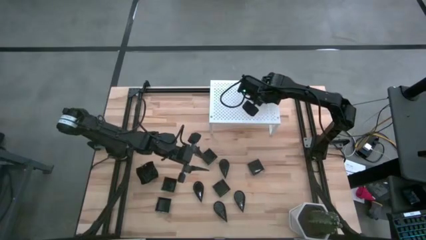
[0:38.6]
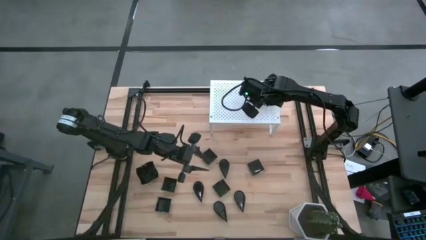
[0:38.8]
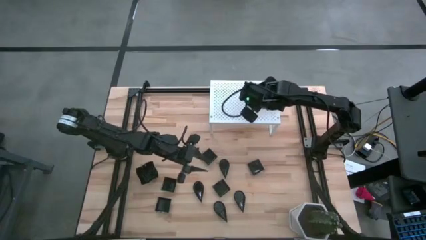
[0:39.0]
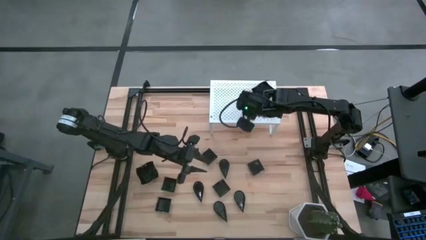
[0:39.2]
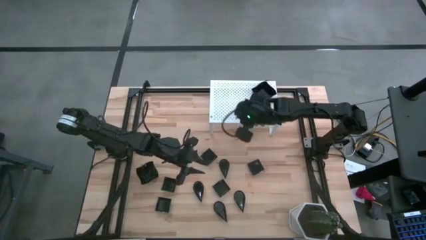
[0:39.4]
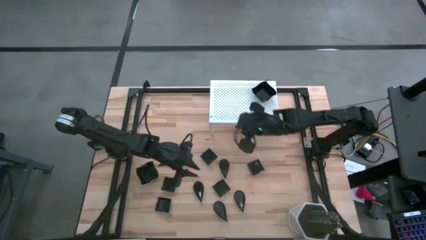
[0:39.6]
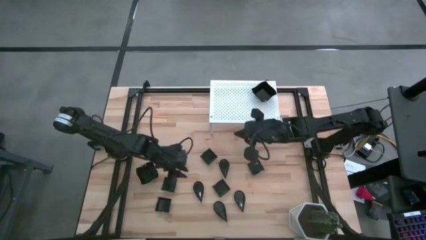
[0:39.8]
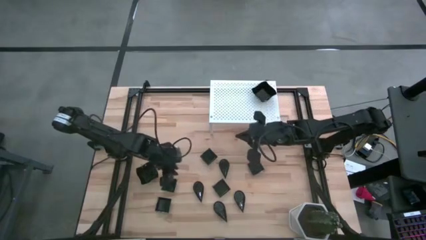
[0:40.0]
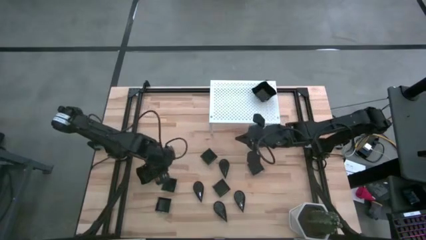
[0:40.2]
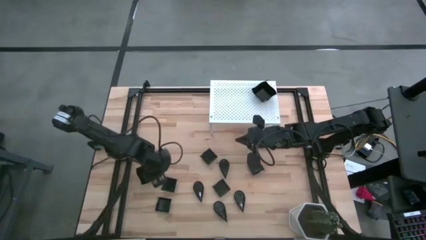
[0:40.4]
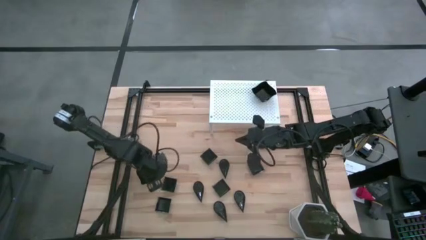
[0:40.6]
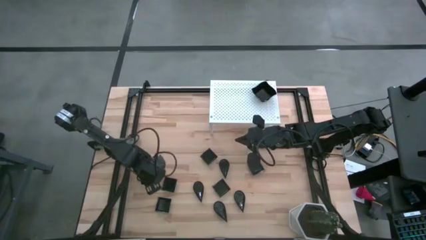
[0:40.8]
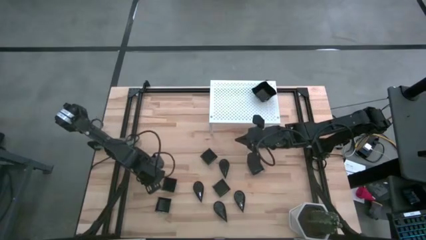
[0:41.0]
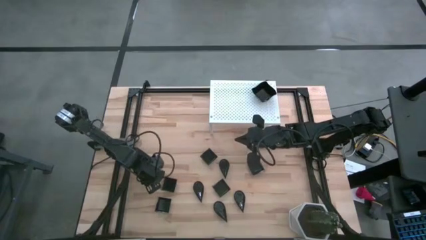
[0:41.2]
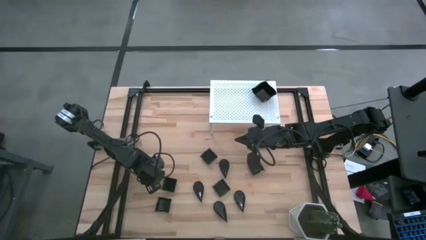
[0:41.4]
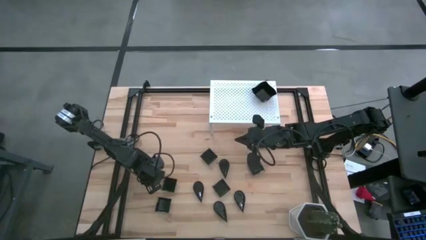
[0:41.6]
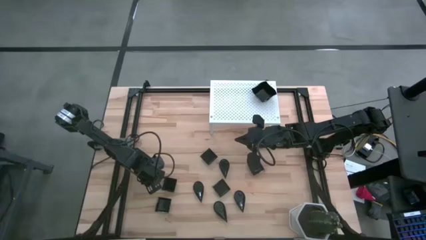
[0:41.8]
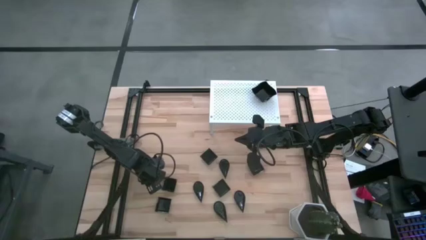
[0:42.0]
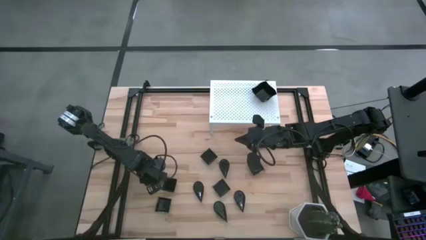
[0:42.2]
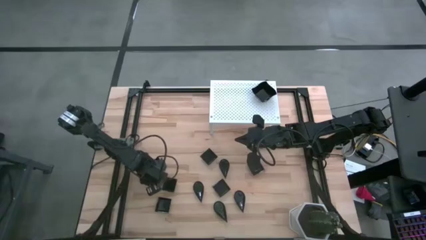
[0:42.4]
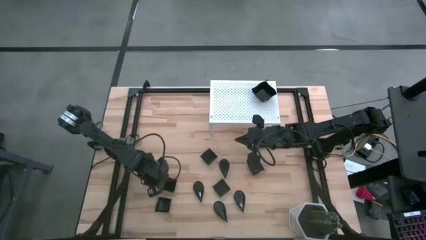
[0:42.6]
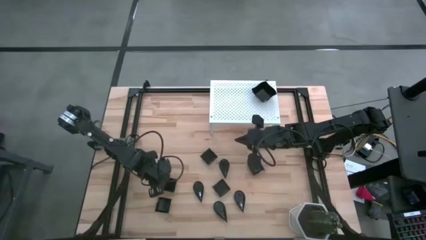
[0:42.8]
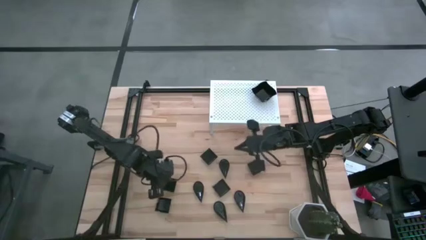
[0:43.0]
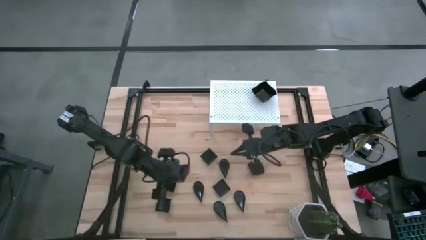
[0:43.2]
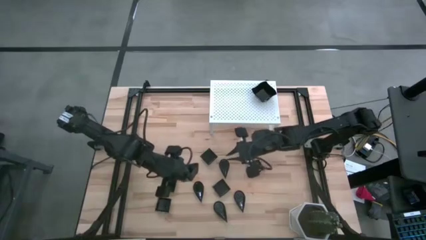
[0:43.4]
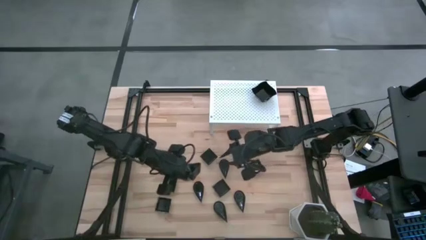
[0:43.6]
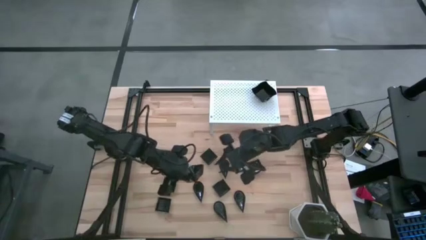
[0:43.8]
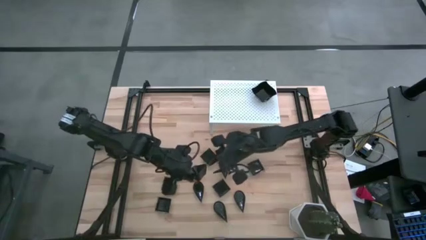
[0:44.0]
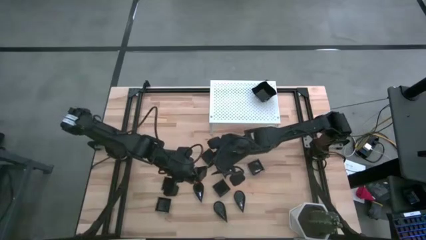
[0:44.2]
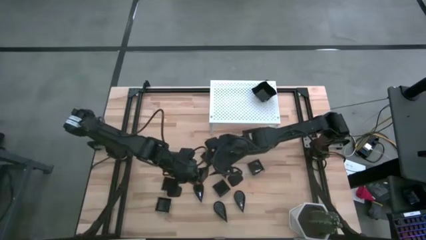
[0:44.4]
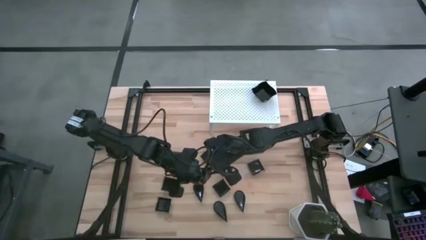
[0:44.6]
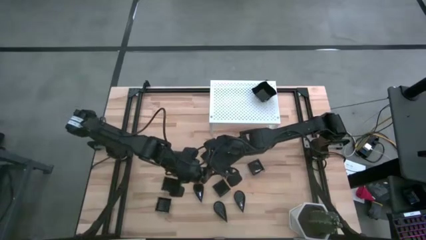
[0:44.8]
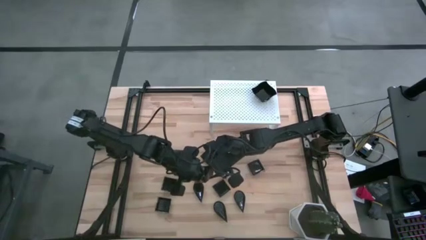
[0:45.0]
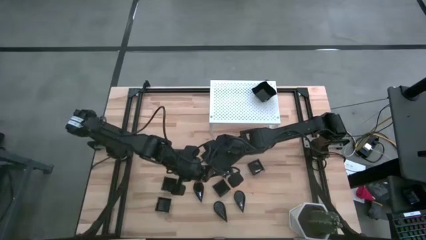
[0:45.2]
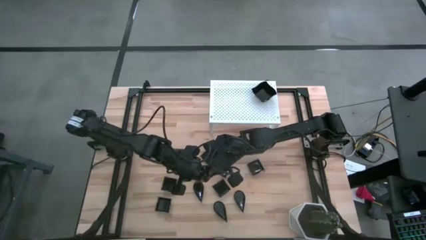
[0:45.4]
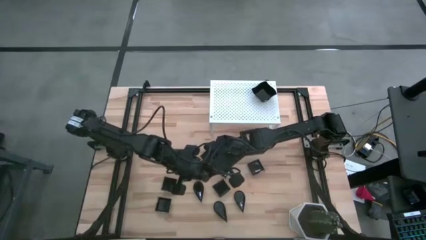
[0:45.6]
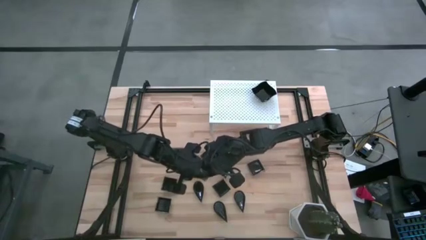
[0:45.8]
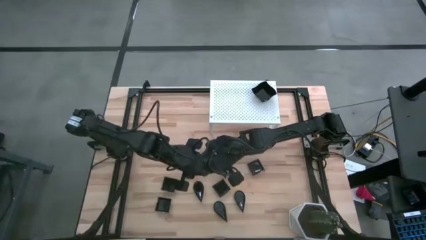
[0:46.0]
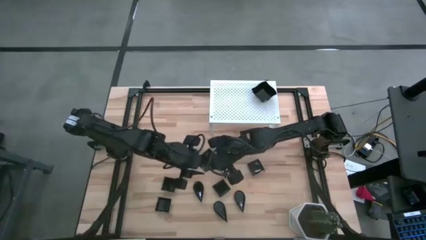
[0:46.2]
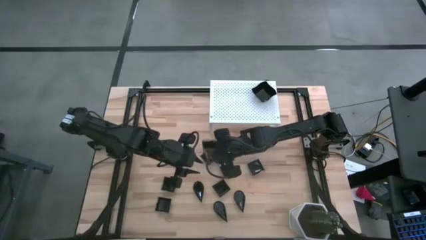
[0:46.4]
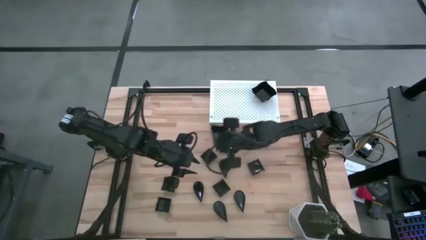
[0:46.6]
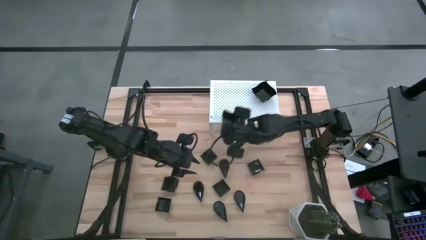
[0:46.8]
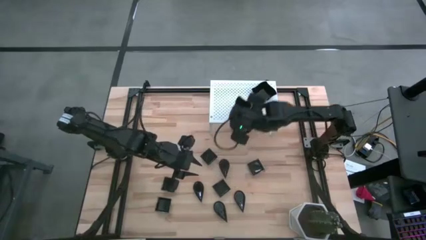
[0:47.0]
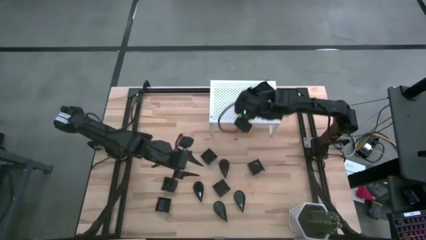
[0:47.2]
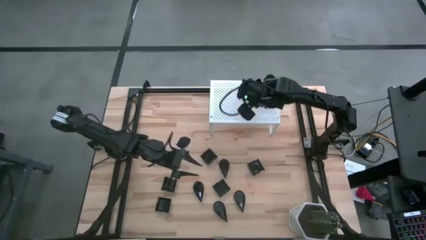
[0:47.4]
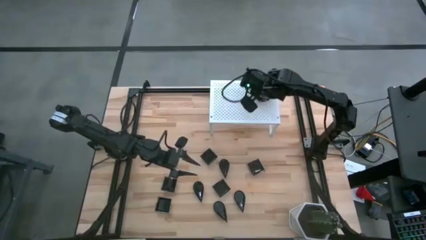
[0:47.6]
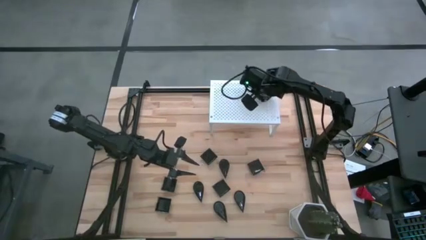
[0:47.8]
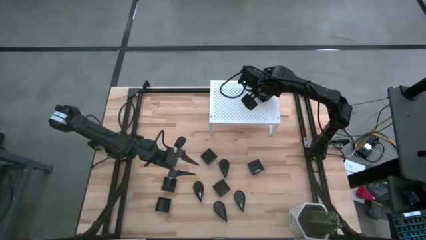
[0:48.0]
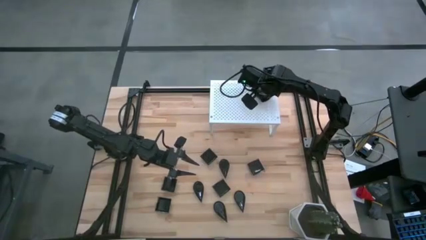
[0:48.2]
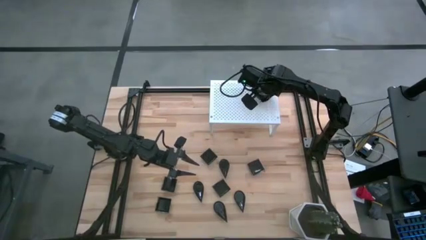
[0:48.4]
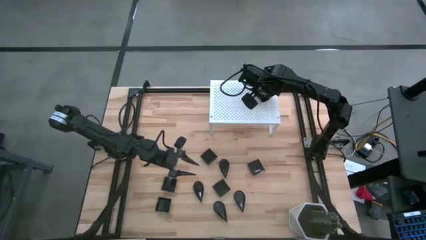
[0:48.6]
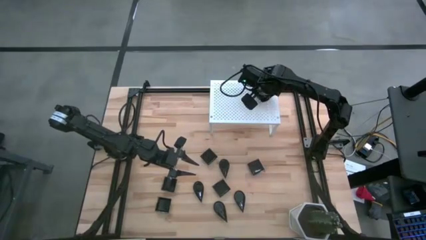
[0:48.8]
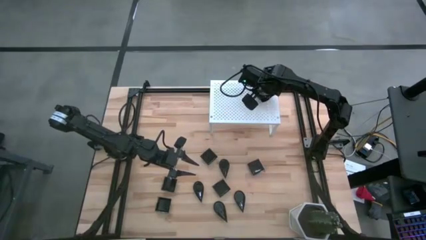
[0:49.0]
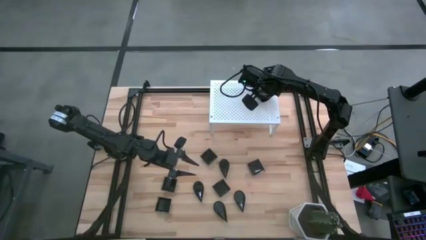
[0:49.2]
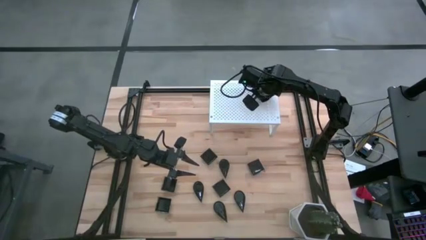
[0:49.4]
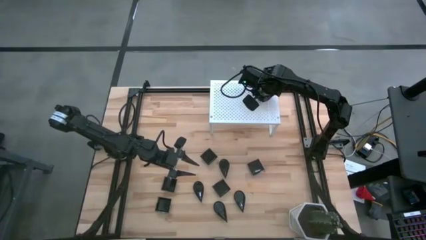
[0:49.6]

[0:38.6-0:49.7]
Task: Pick & Place Mini shaped plates
Stack the distorted square plate on top of the distorted square plate on the shelf
